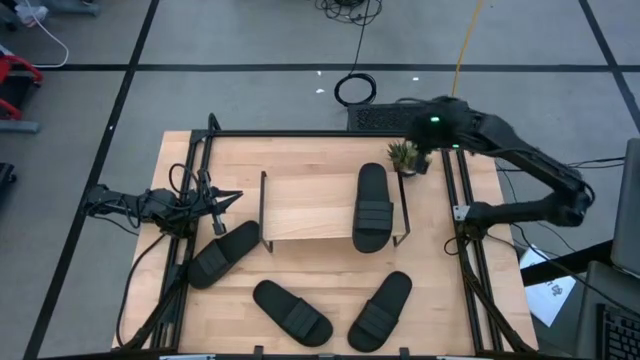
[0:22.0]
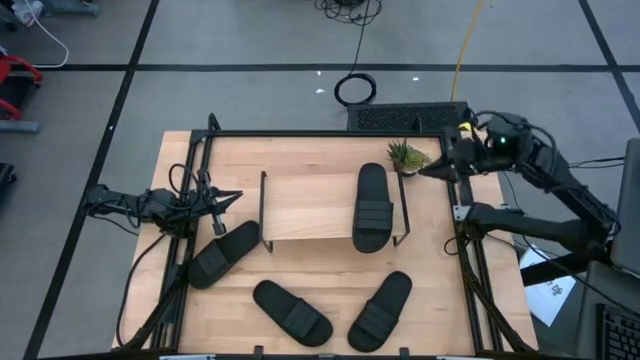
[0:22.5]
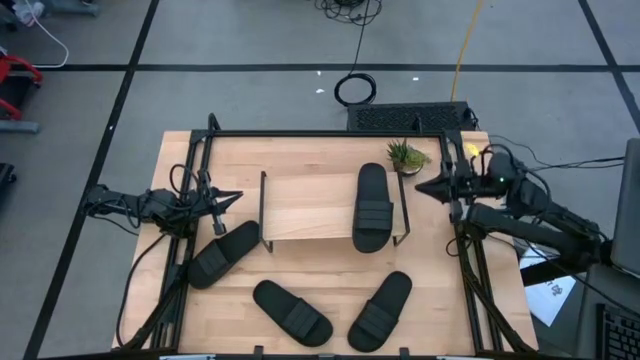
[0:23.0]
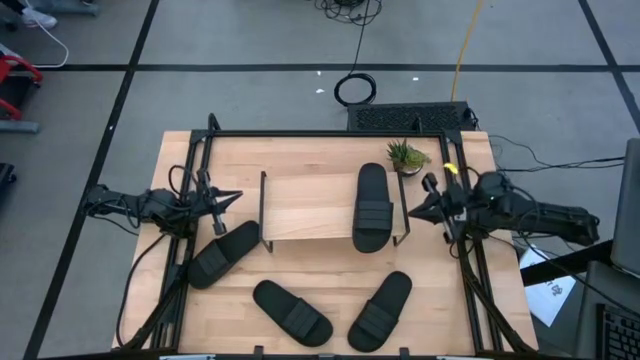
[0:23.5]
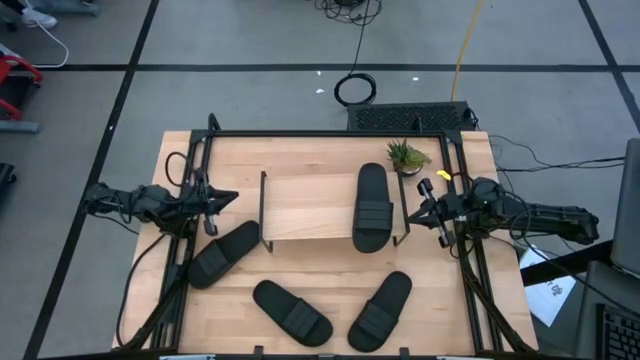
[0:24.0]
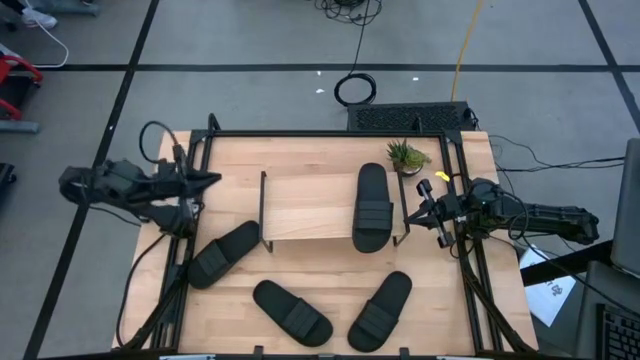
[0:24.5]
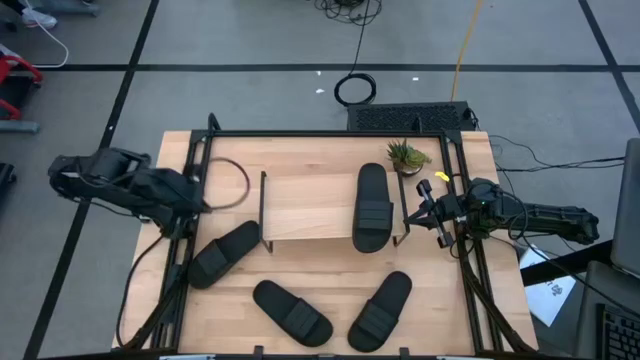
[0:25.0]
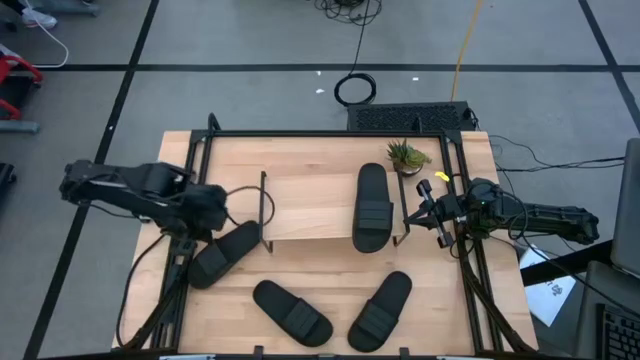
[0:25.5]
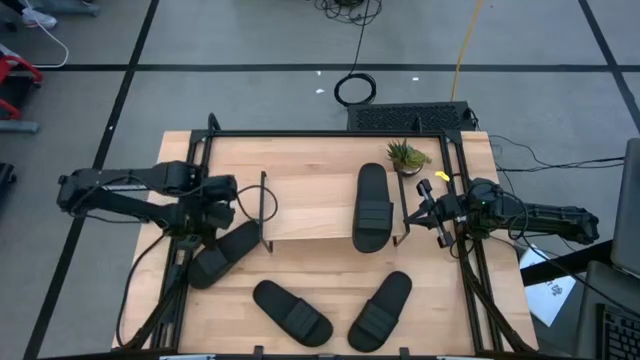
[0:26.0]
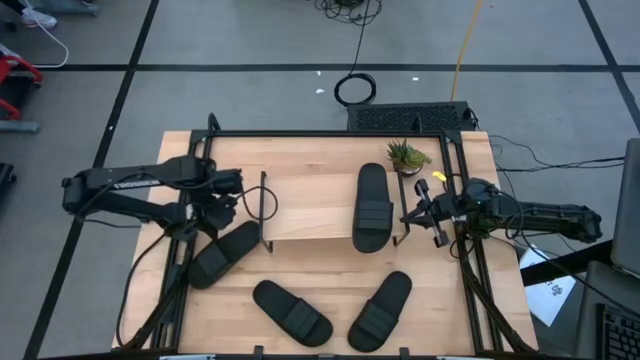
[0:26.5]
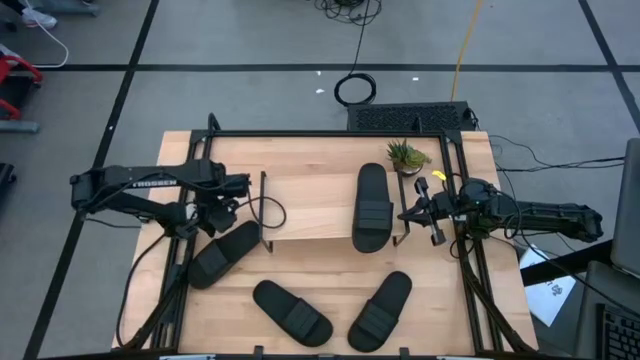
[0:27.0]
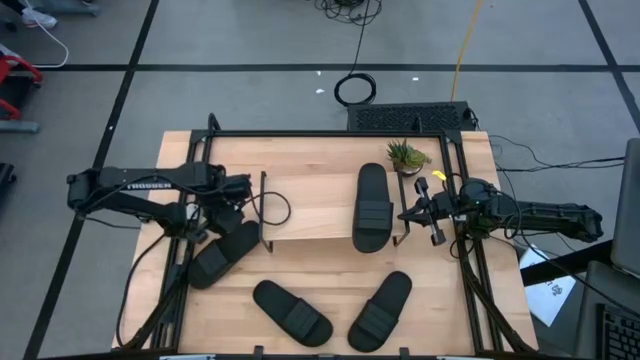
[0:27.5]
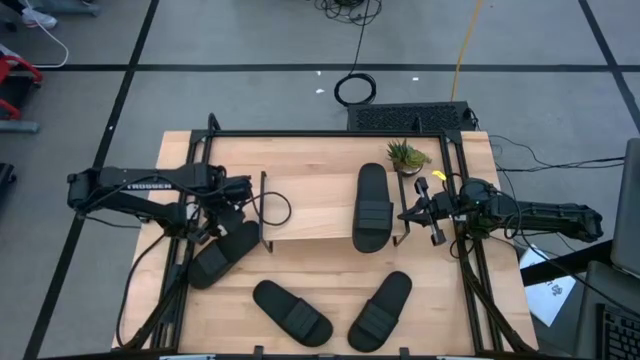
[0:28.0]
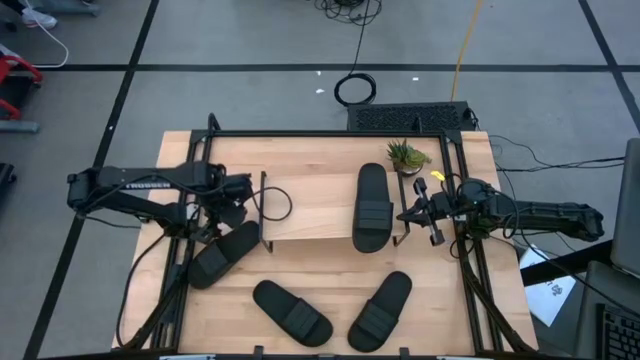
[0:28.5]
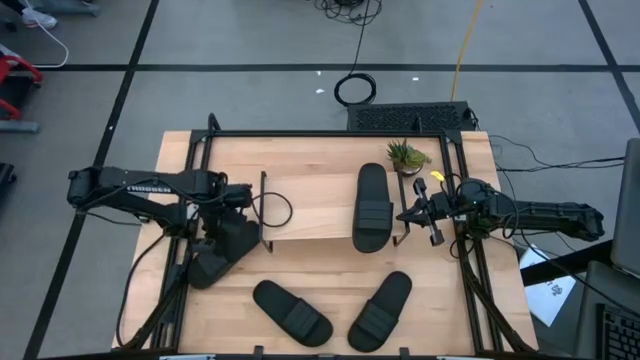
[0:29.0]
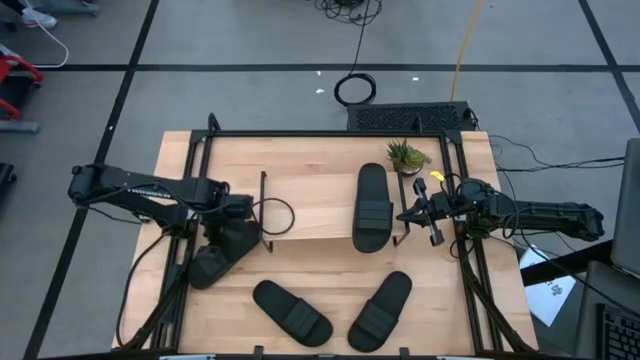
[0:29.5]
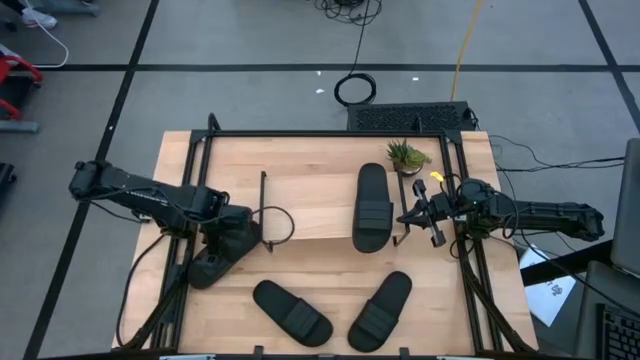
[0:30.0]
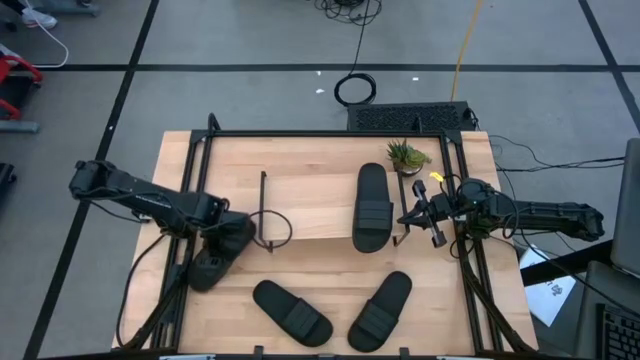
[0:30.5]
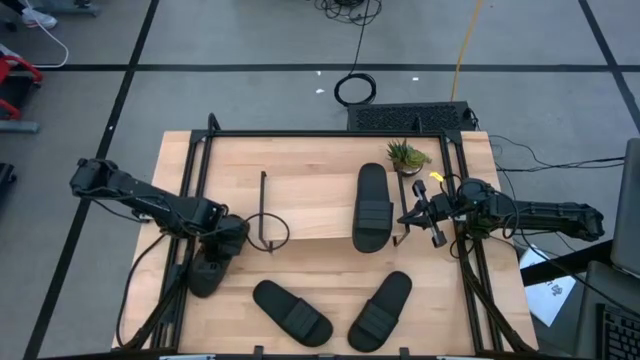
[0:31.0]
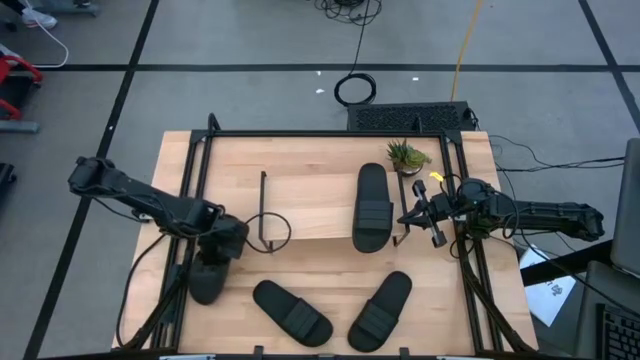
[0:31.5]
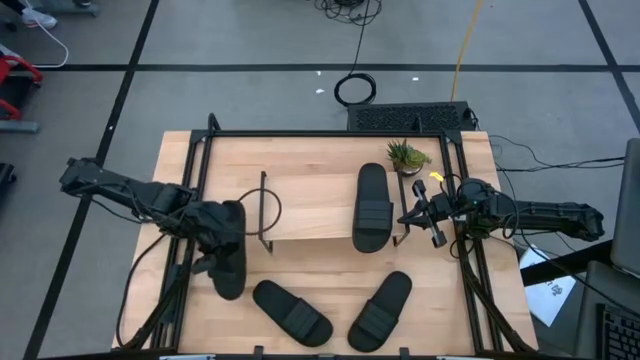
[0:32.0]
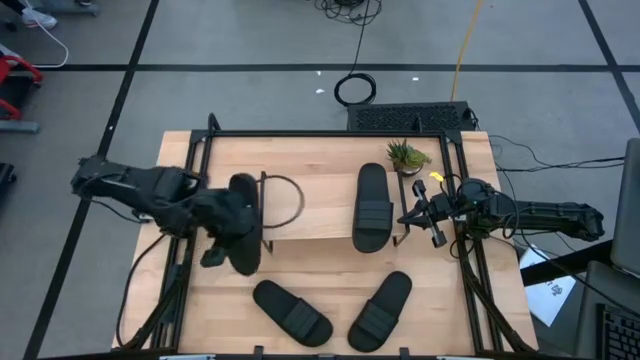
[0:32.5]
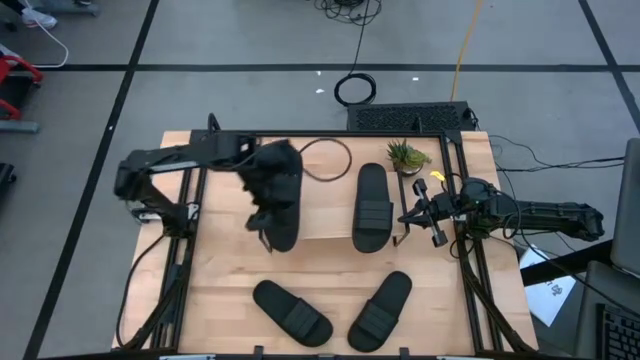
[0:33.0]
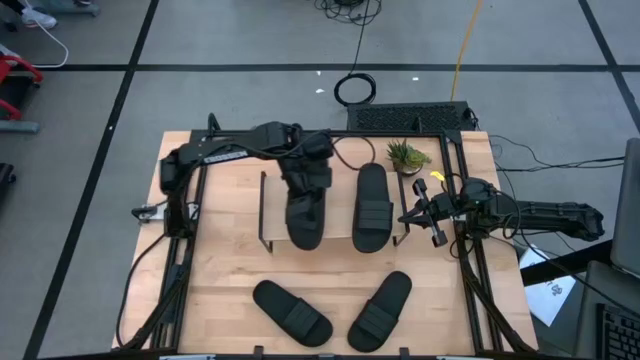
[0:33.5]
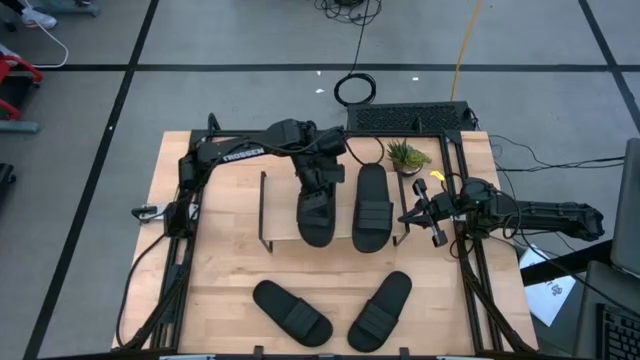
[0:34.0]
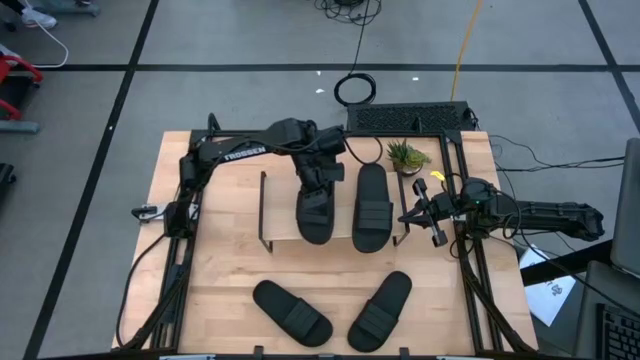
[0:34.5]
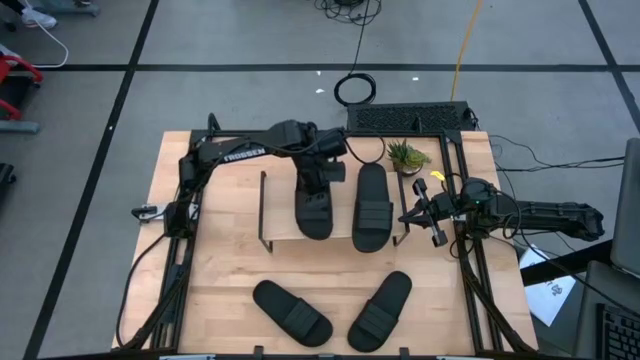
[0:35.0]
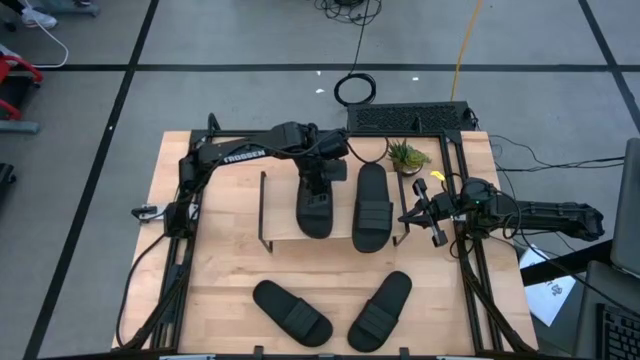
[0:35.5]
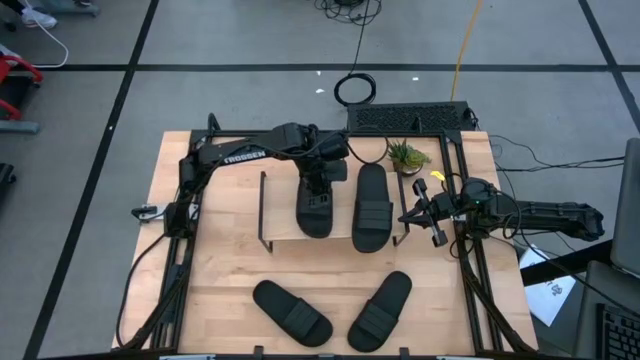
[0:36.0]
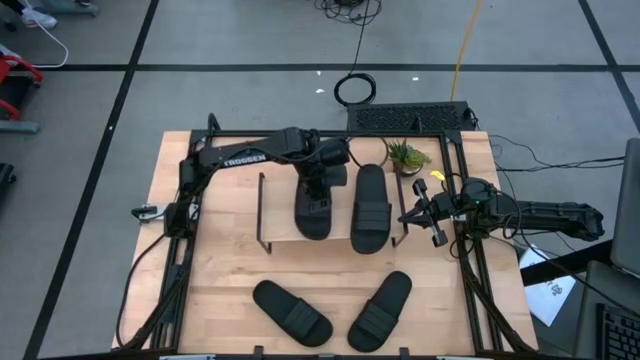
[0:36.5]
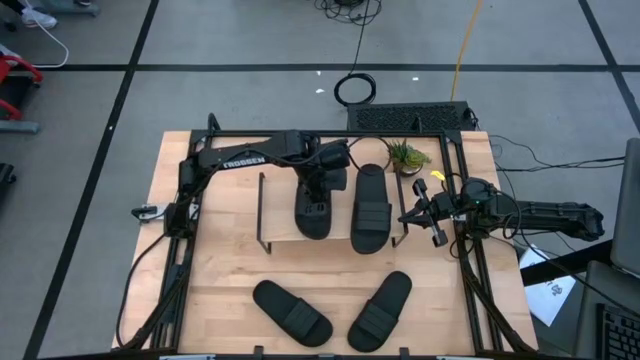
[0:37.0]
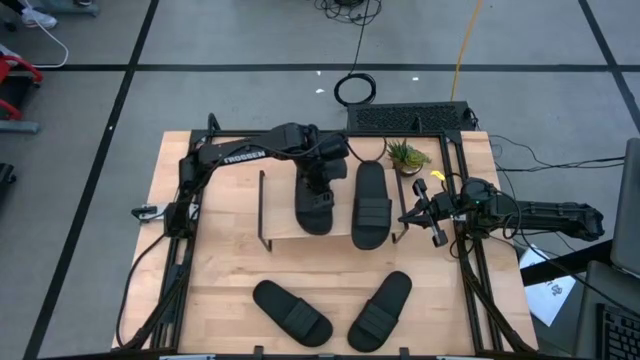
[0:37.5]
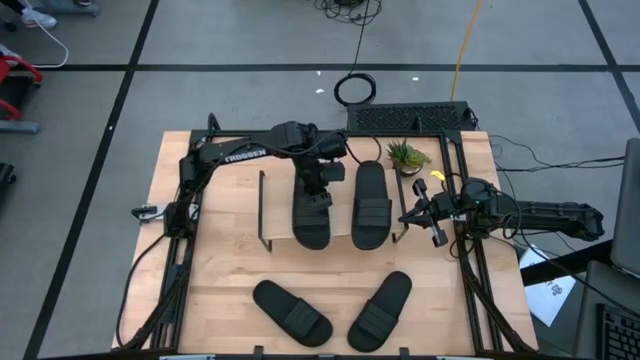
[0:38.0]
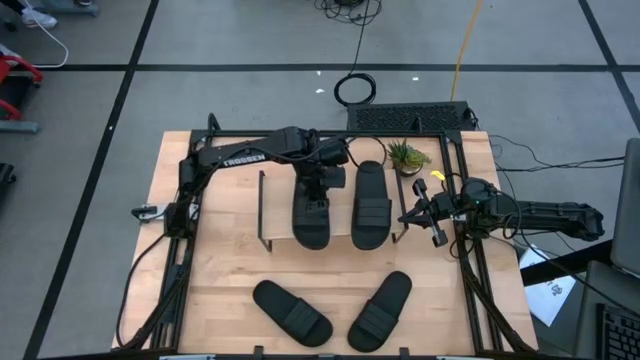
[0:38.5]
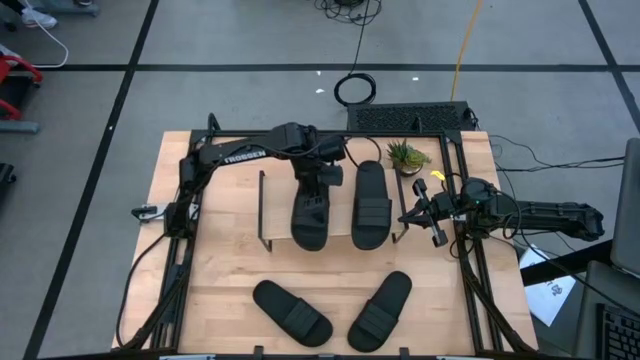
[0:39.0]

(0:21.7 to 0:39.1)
Task: Pick and place slides into the shelf
Put the black slide on the shelf

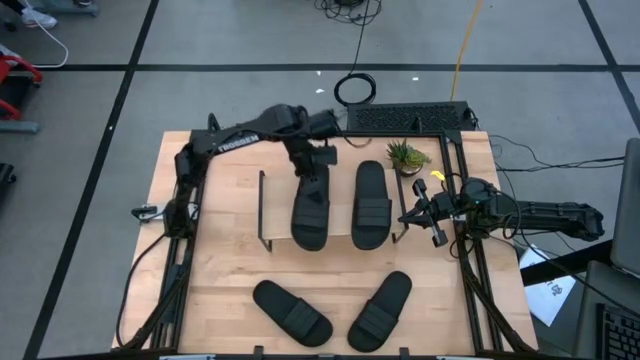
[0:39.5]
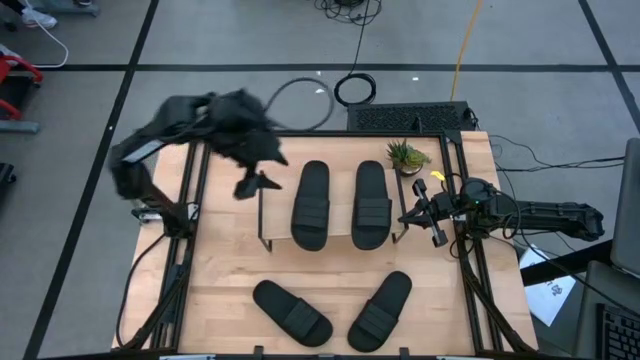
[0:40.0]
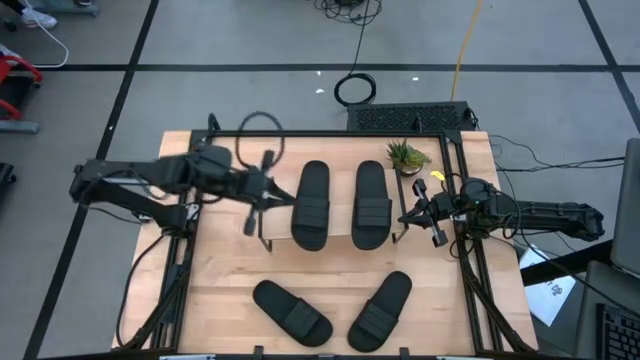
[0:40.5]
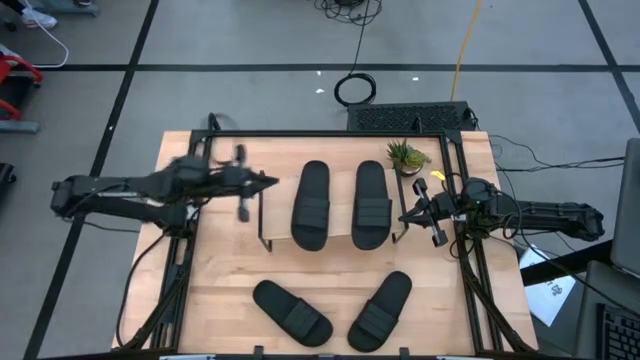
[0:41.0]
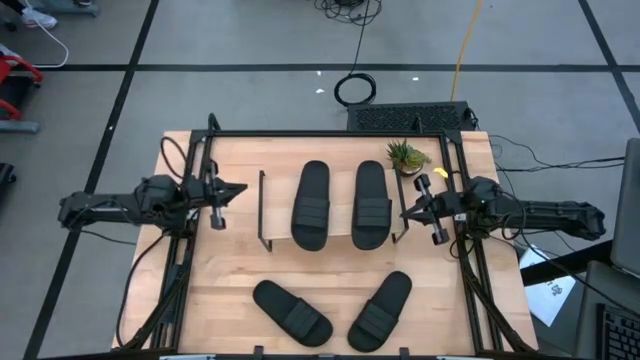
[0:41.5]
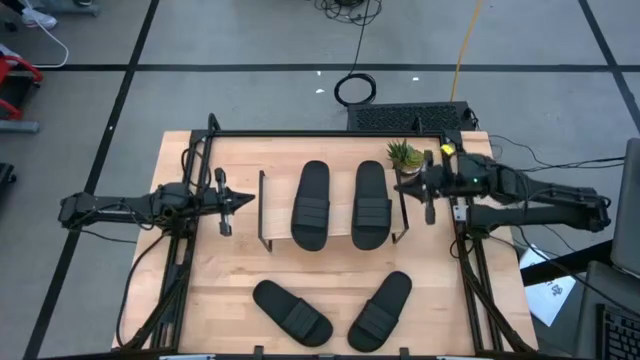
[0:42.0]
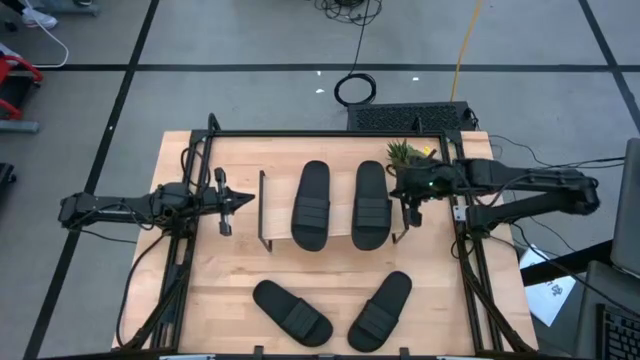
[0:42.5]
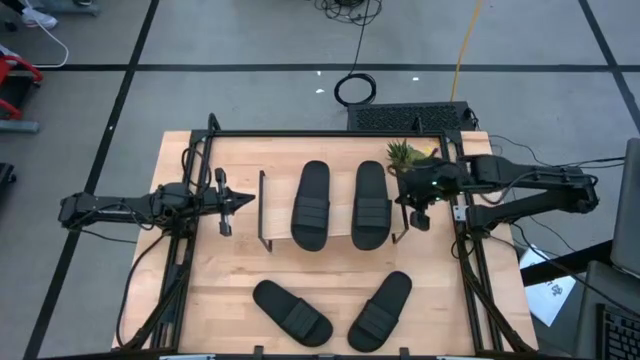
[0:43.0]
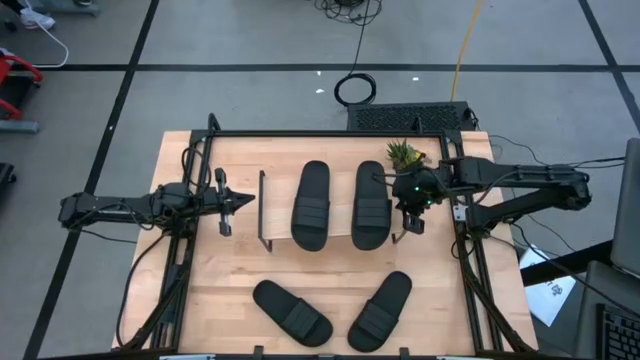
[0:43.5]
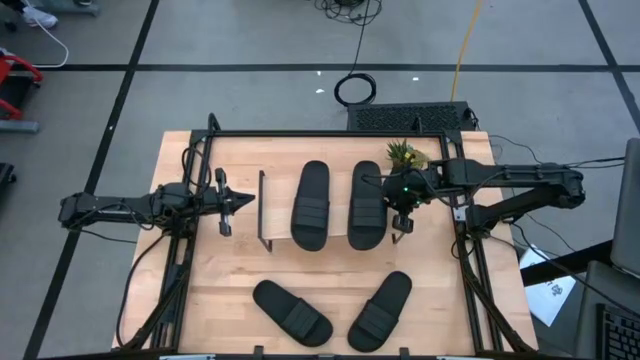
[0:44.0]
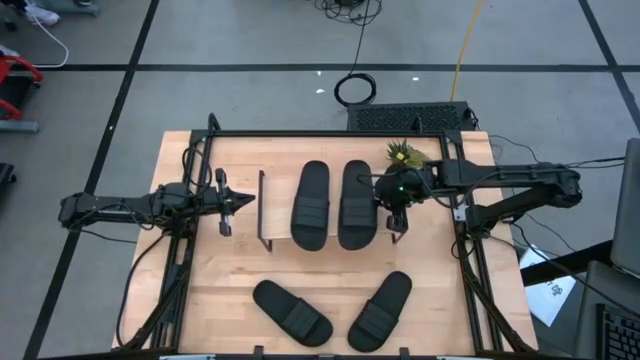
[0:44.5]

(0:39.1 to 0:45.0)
Adjust the black slide from the shelf
